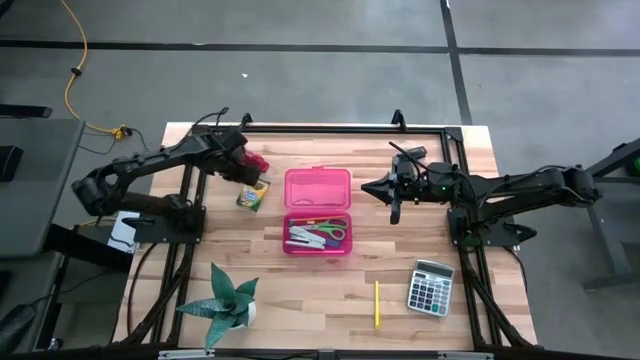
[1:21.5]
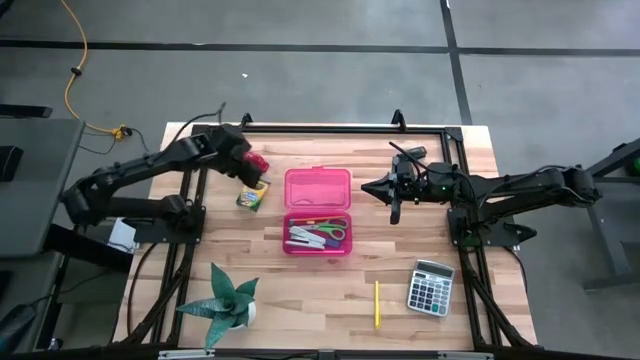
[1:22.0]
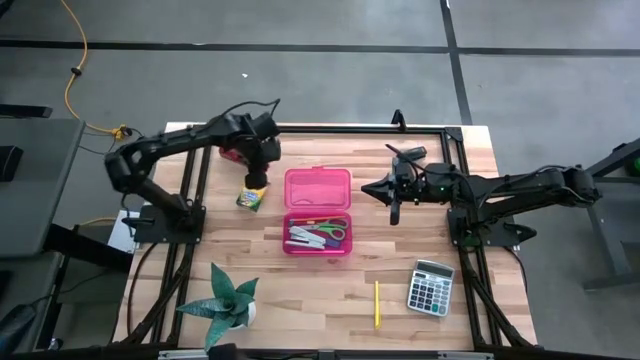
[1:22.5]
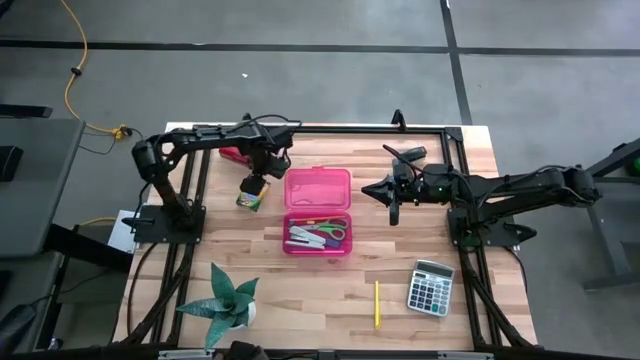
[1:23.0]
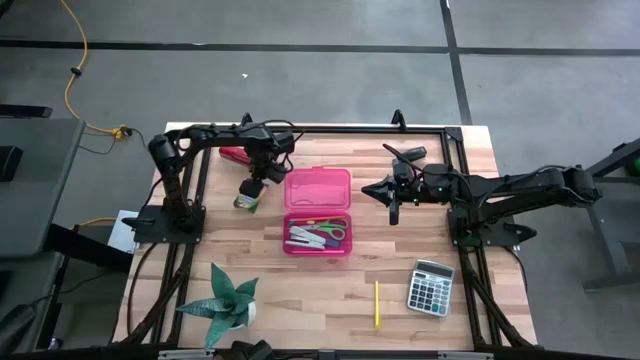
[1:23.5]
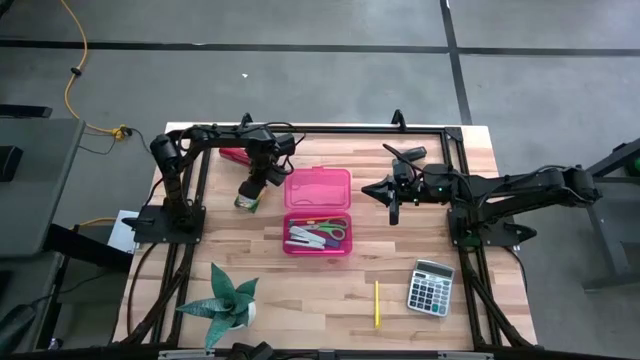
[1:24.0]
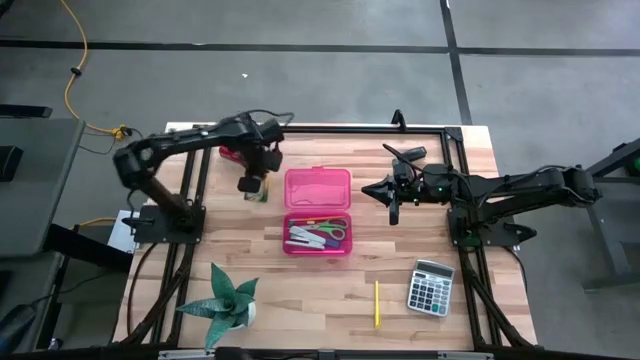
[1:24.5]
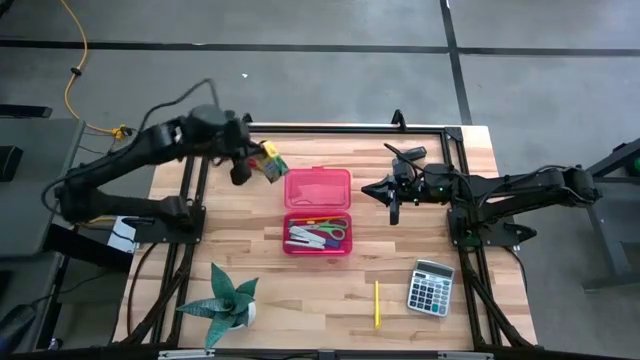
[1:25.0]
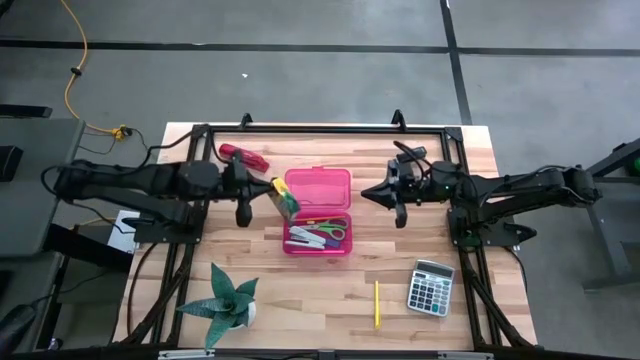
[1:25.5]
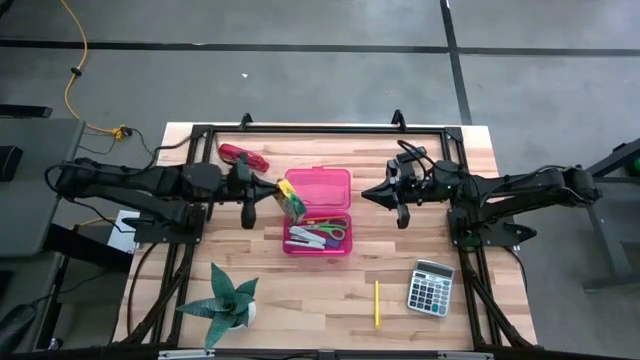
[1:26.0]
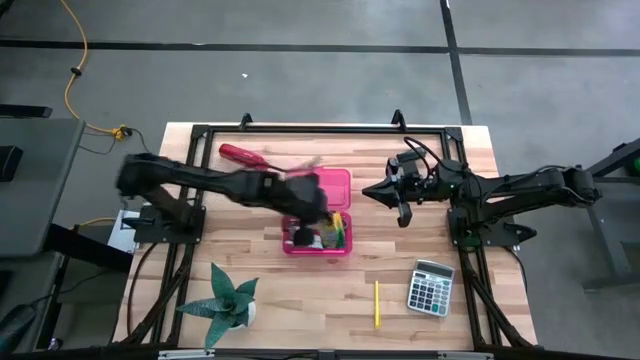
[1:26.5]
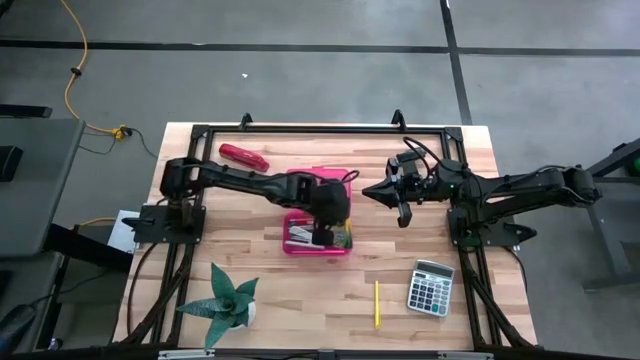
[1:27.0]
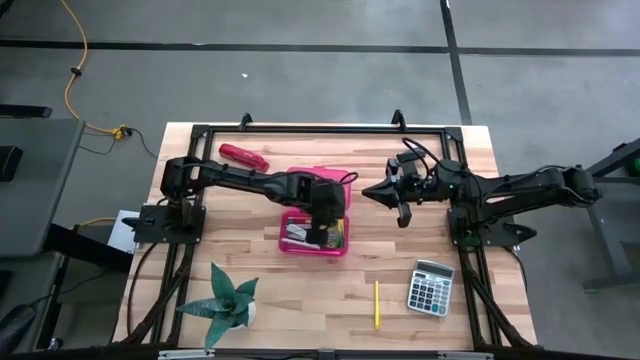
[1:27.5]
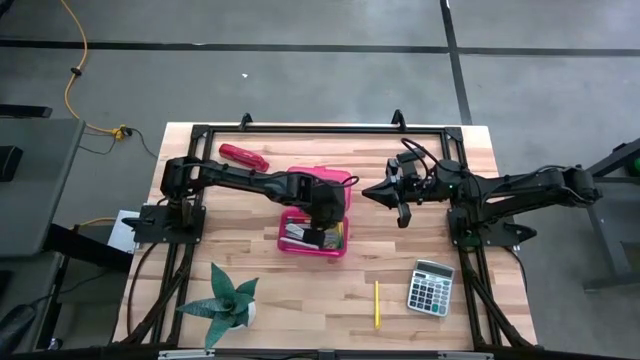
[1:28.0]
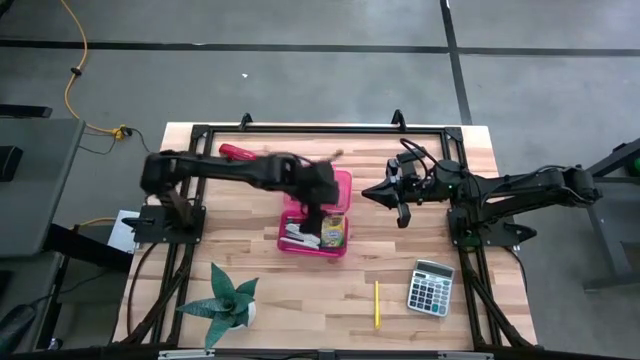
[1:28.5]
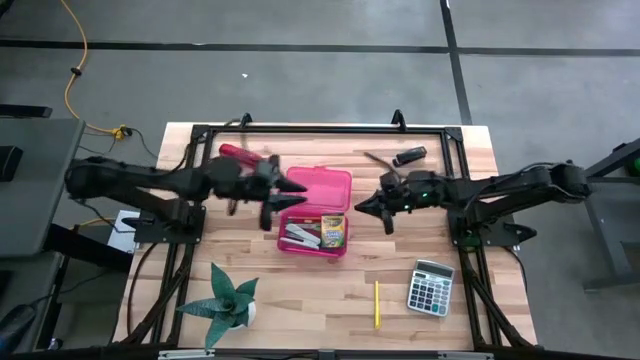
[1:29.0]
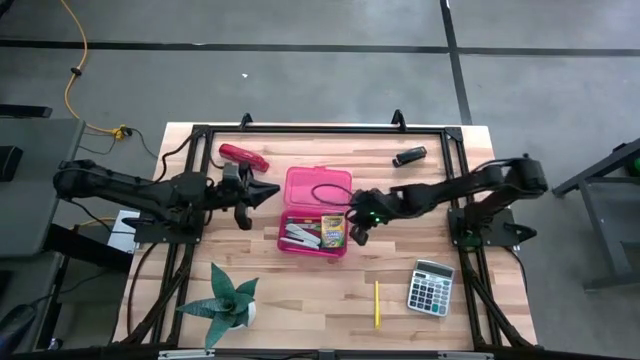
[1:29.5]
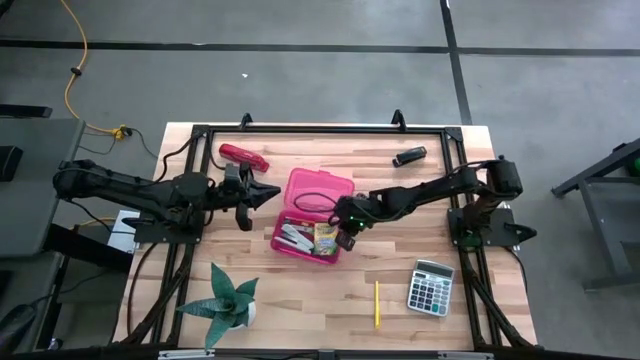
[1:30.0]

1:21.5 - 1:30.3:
Task: Pack school essentials
Put the yellow crayon box into the pink supply box

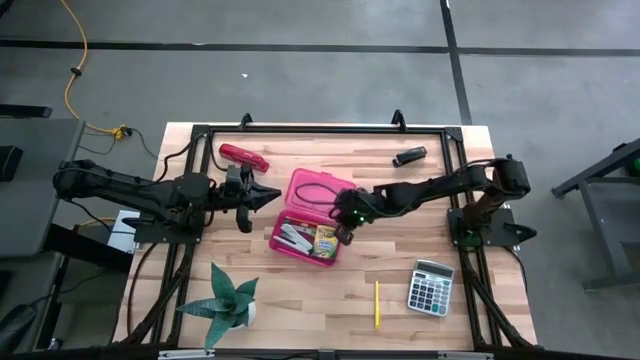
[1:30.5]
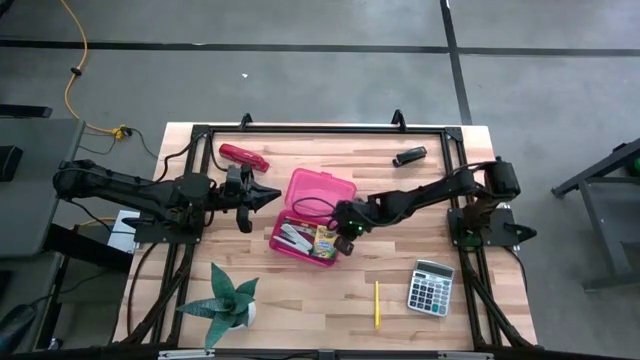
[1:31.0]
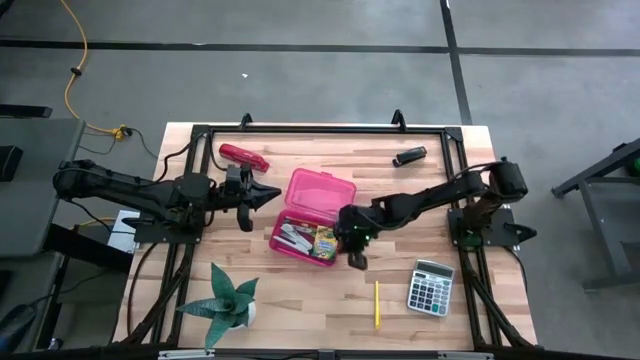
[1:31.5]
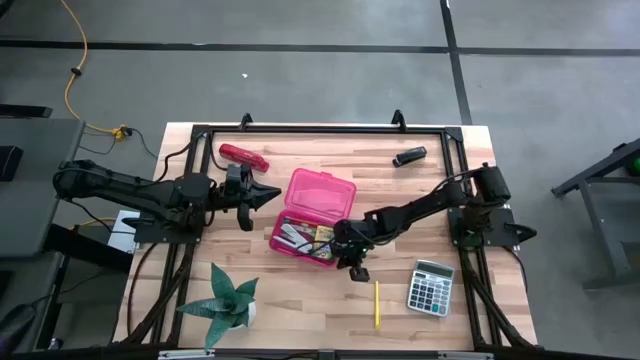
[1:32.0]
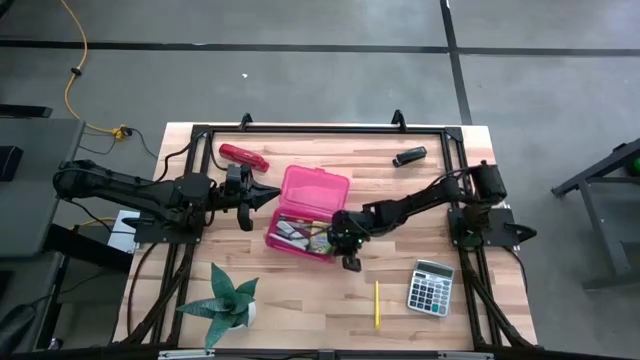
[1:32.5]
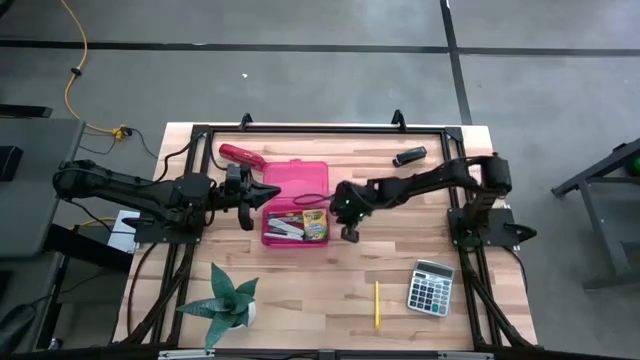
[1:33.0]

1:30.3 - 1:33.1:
Adjust the pink supply box

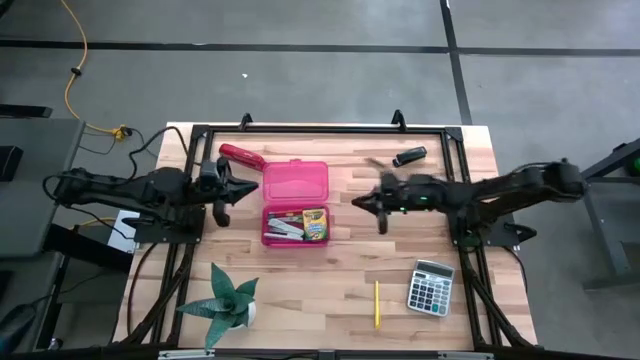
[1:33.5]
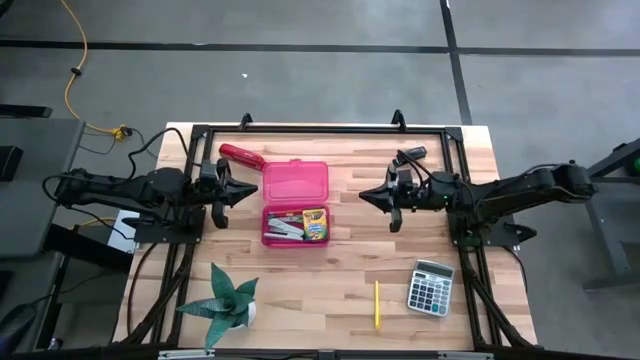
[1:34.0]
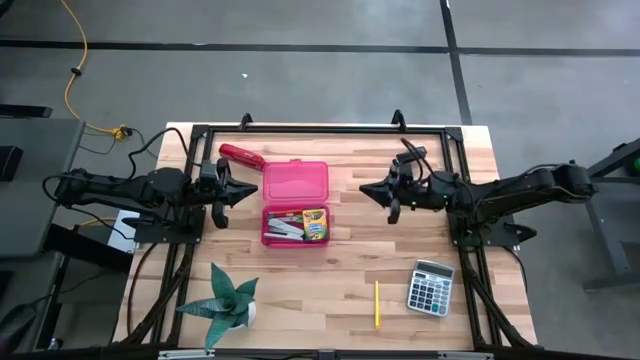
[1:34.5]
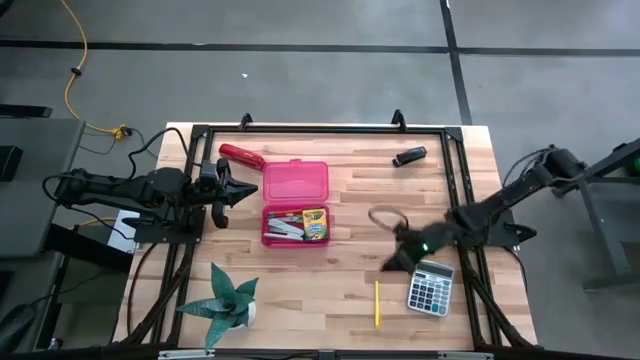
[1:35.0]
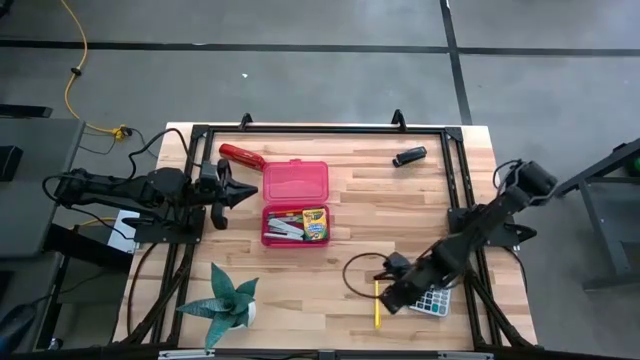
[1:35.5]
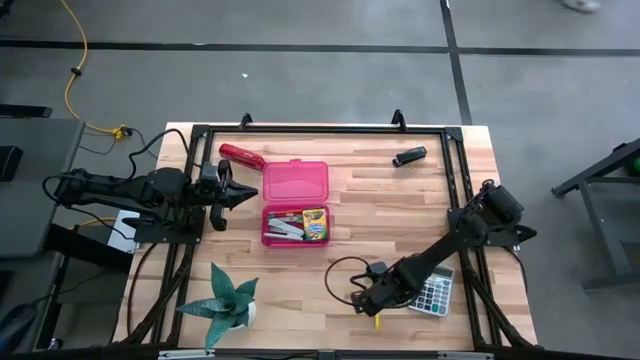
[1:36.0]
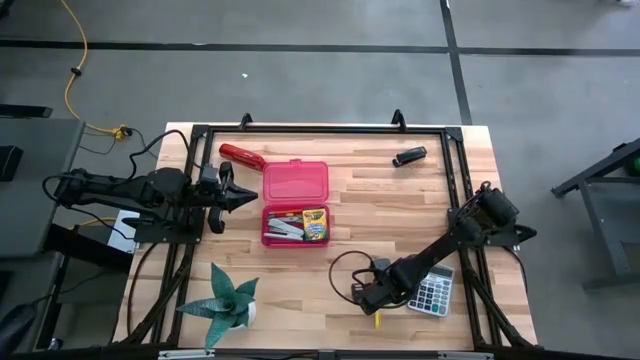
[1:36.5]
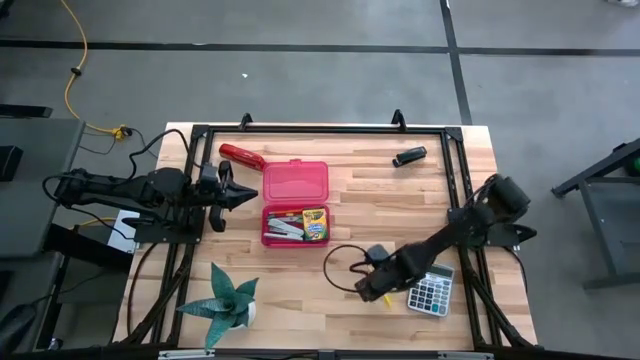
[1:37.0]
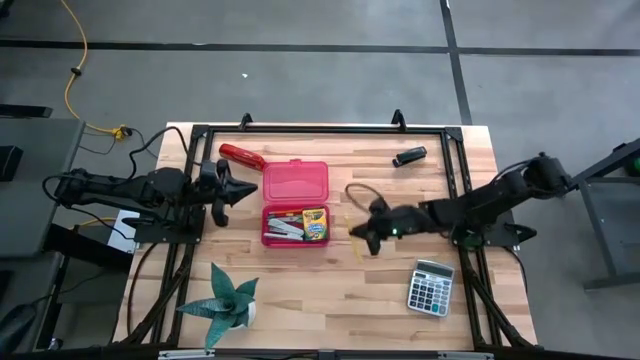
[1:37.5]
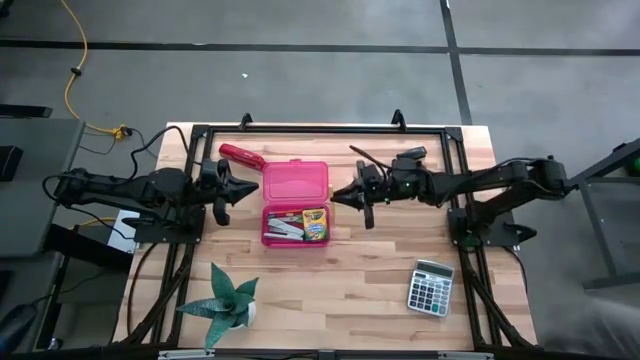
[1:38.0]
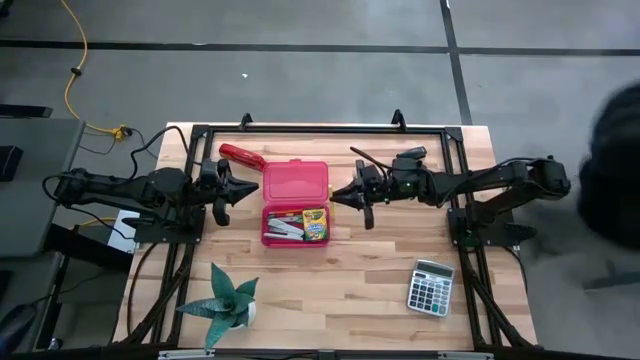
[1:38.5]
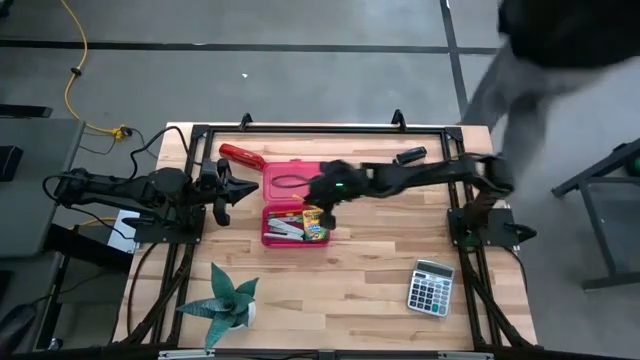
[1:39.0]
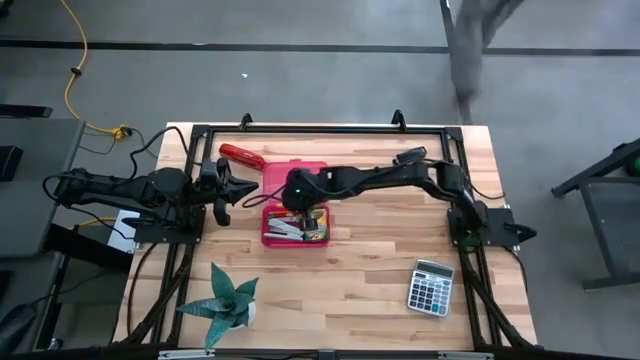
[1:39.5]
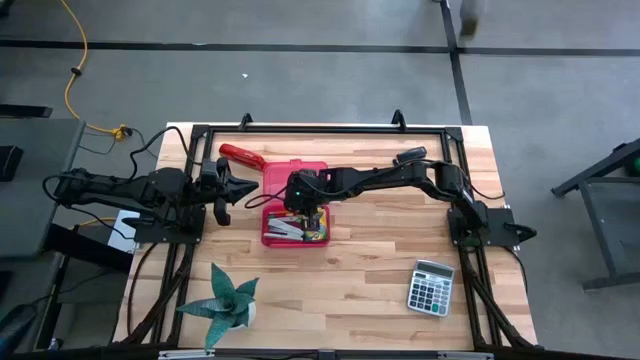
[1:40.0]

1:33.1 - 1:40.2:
Put the yellow pen into the pink supply box

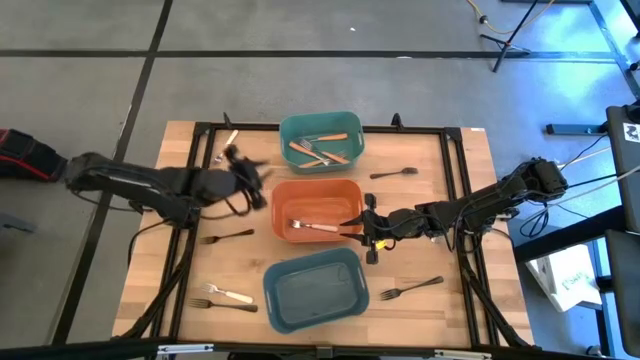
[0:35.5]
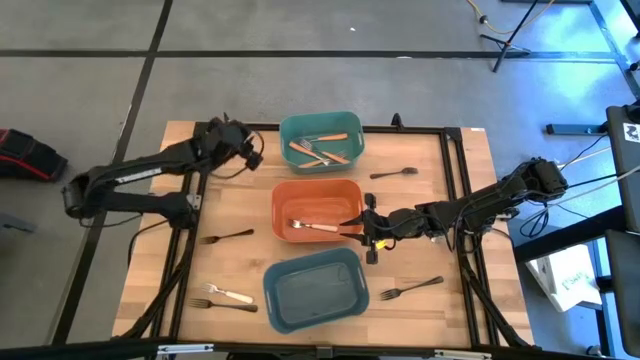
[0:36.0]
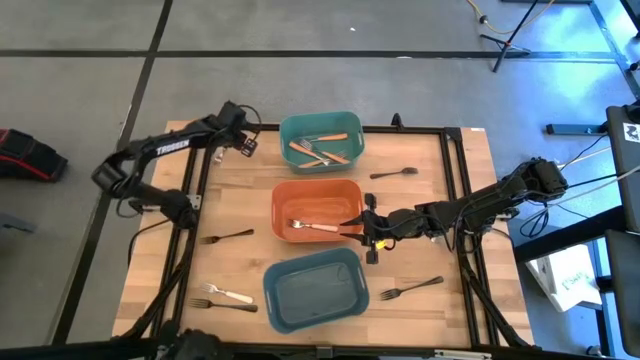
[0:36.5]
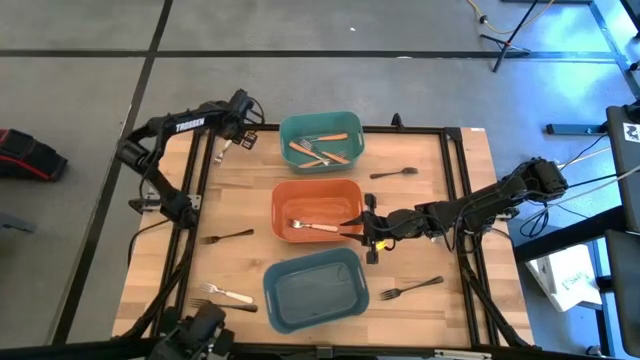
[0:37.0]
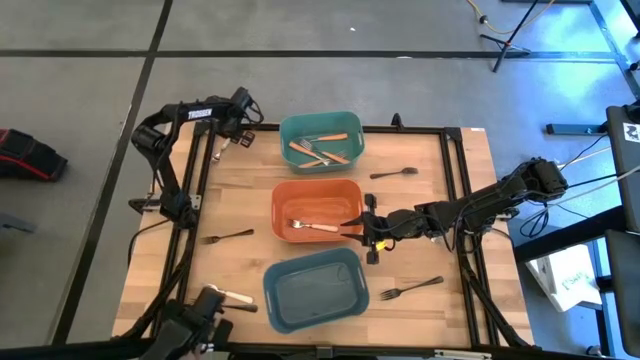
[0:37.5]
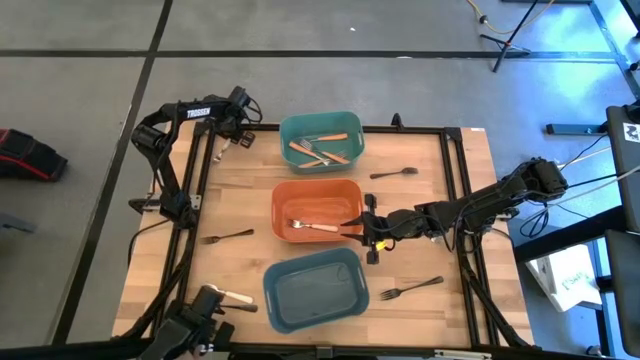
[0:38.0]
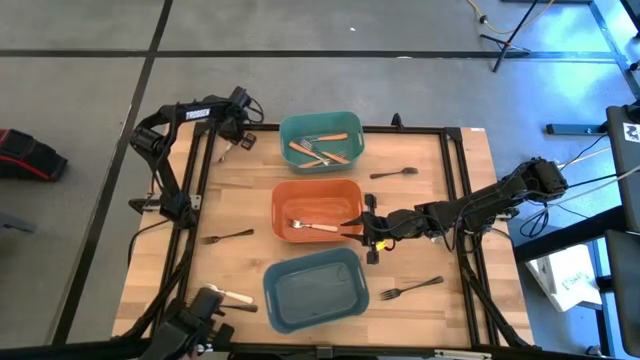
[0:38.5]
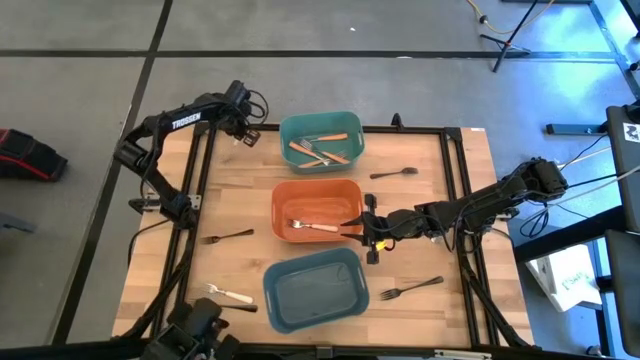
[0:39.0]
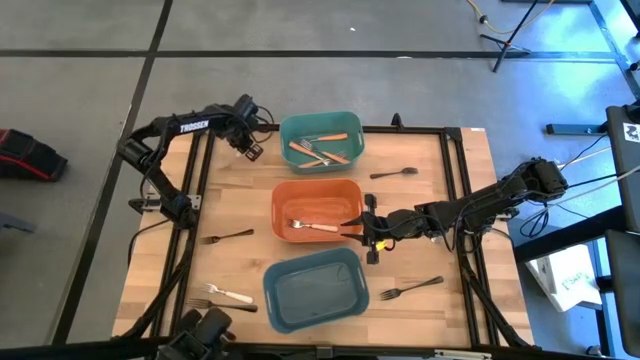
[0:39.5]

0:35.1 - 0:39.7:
Task: Sort silverware by color (type)
Put the white fork into the orange bin
